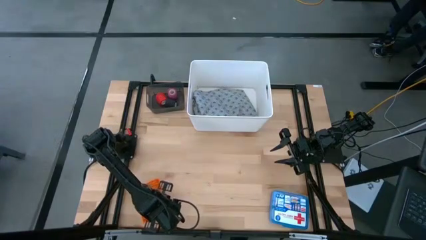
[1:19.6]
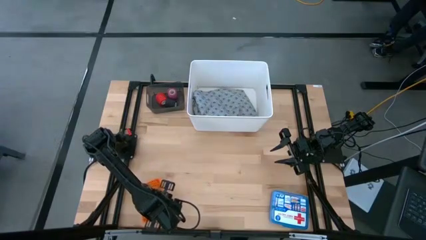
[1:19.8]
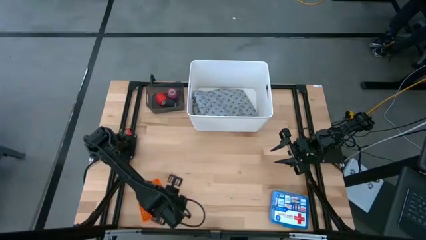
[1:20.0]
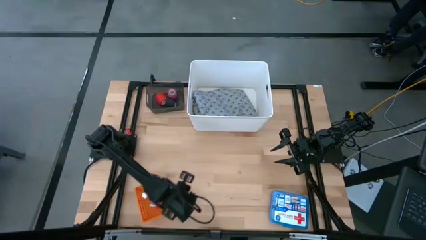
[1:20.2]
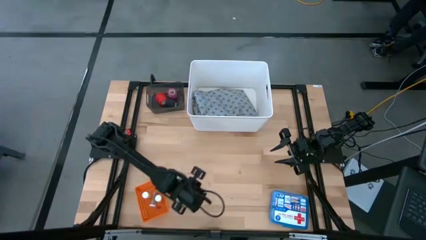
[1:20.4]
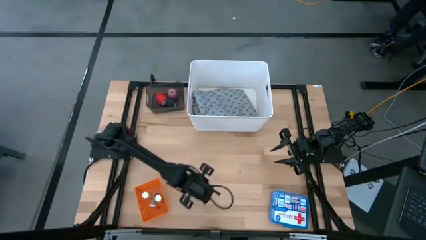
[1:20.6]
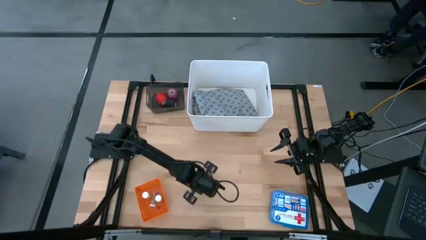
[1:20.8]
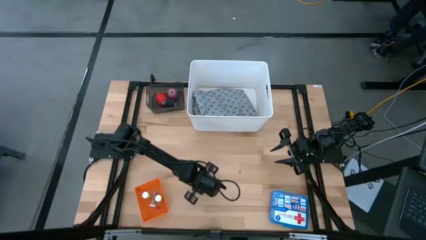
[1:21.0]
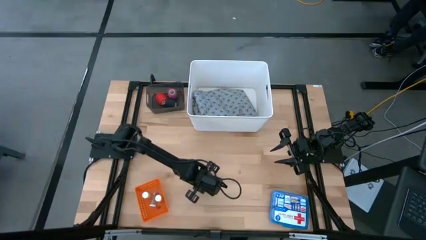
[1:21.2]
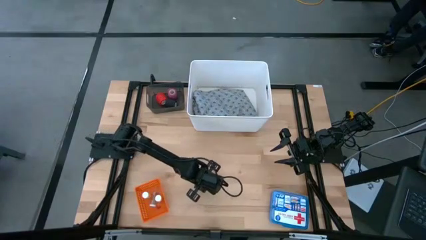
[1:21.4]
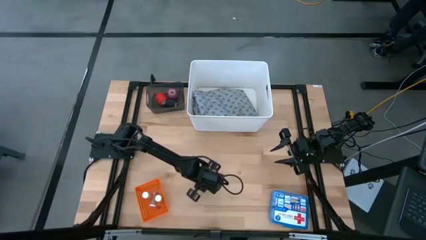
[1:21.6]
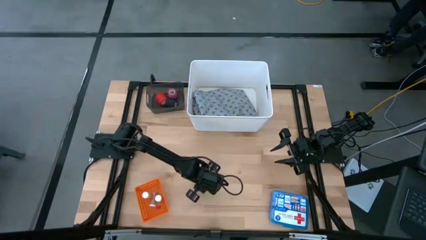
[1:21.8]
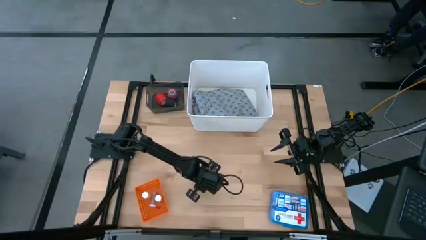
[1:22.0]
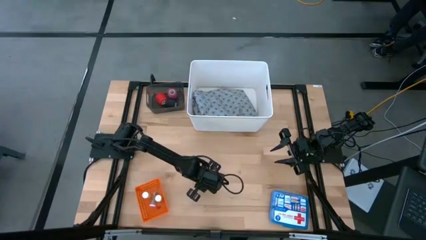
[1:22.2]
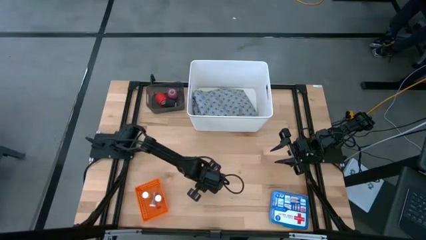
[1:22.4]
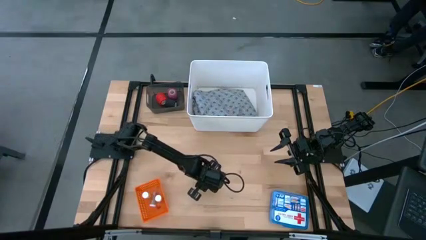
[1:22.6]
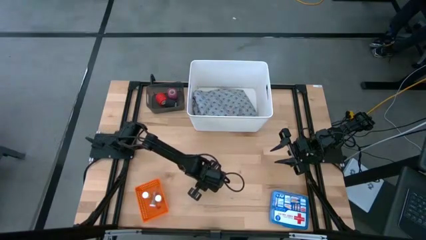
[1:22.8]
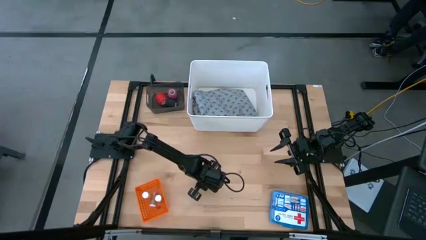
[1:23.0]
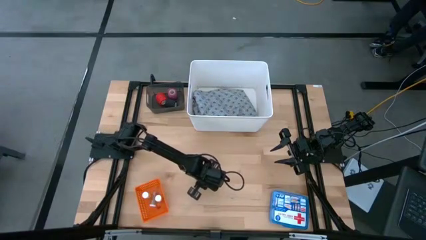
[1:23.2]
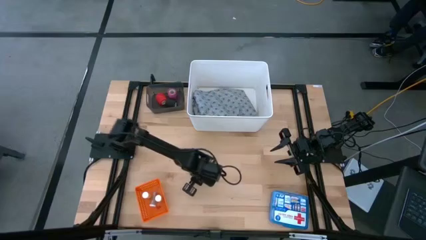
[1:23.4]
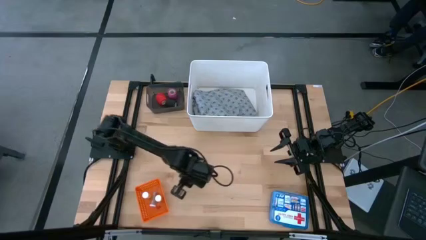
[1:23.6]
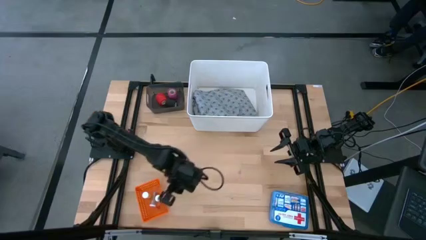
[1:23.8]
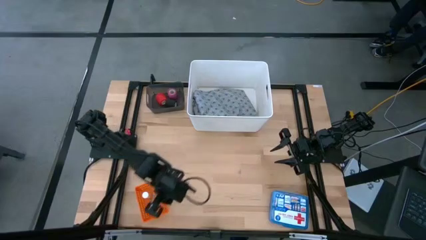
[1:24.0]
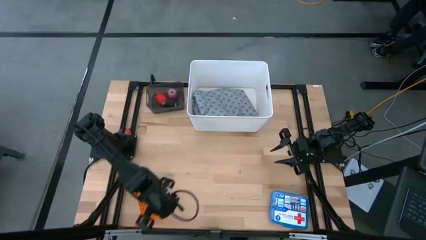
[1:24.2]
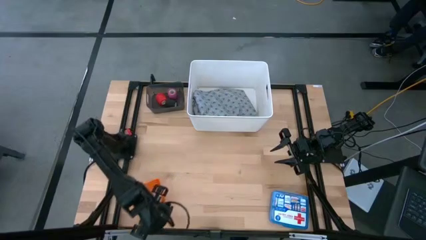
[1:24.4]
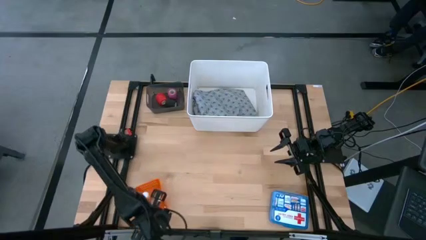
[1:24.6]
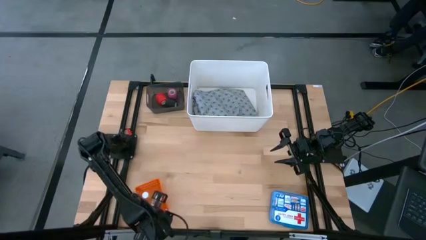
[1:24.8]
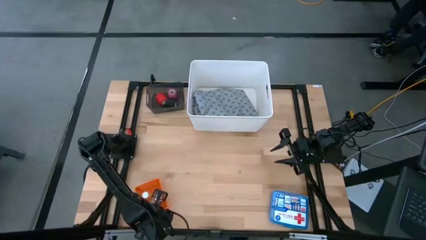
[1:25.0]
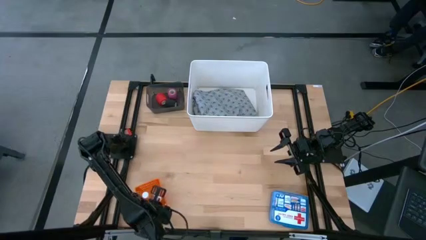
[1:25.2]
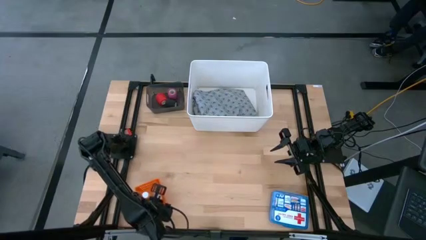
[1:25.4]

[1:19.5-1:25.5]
Task: Pick & Place Medicine items
Put the pink capsule into the orange bin

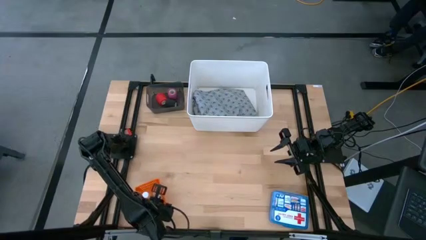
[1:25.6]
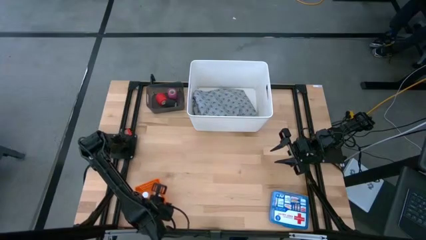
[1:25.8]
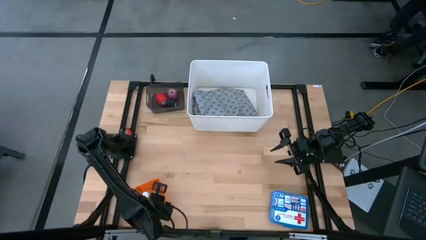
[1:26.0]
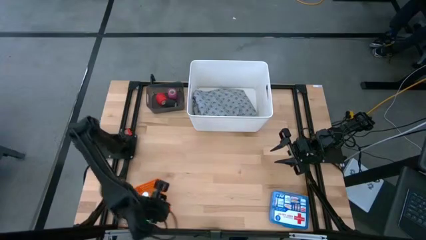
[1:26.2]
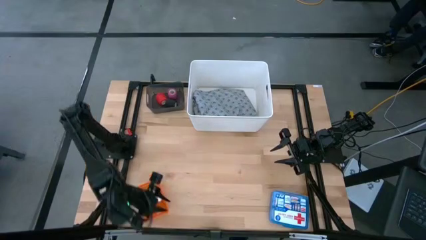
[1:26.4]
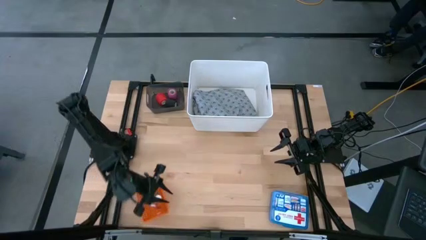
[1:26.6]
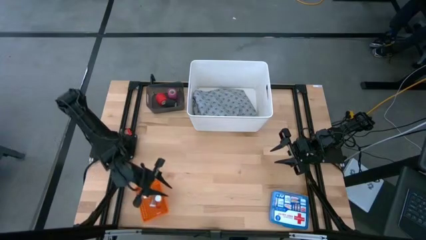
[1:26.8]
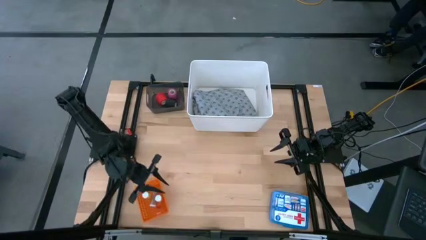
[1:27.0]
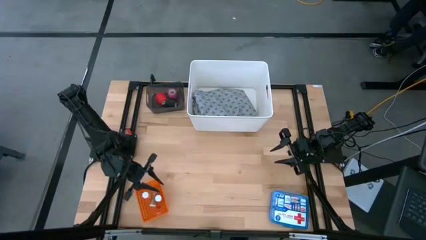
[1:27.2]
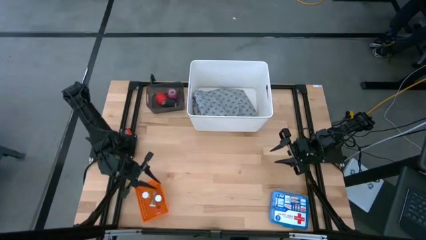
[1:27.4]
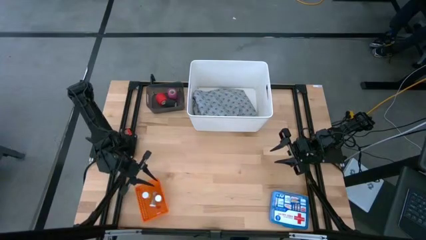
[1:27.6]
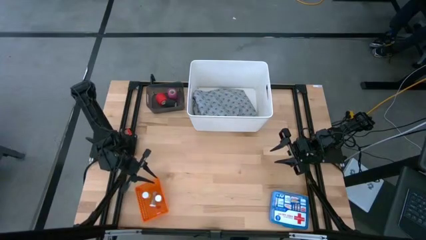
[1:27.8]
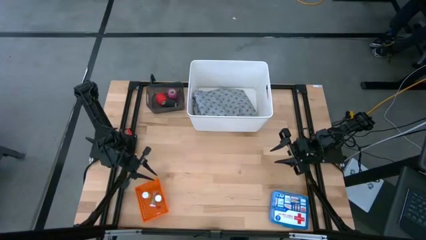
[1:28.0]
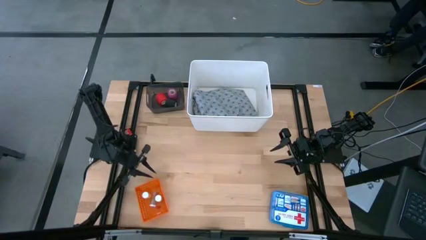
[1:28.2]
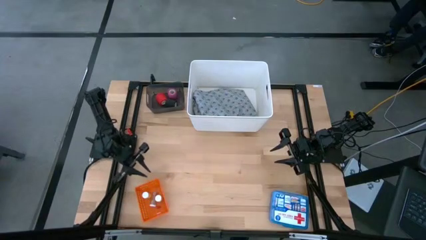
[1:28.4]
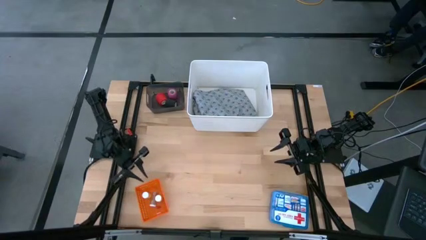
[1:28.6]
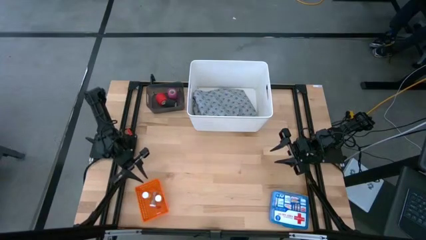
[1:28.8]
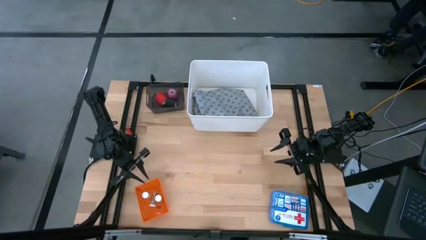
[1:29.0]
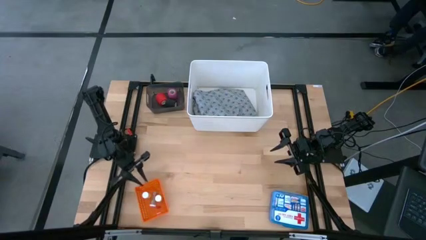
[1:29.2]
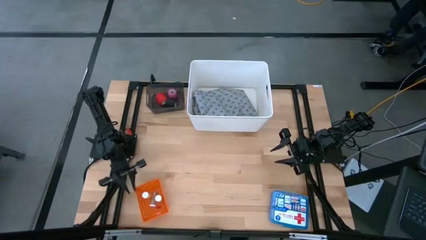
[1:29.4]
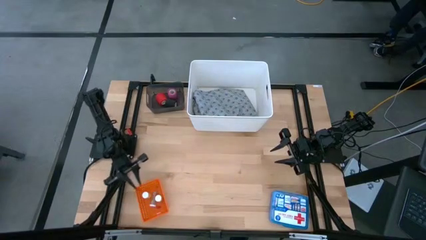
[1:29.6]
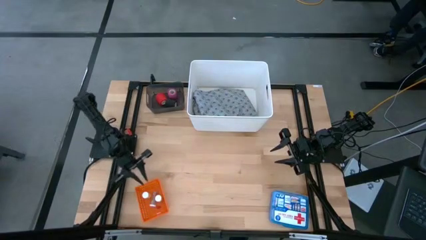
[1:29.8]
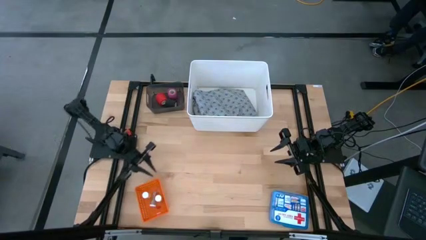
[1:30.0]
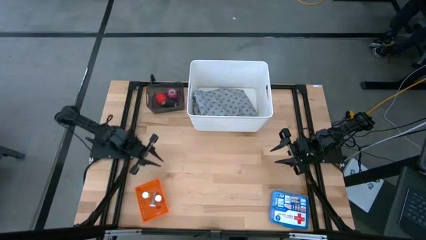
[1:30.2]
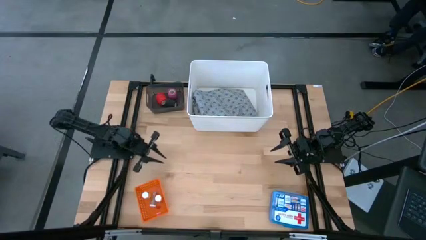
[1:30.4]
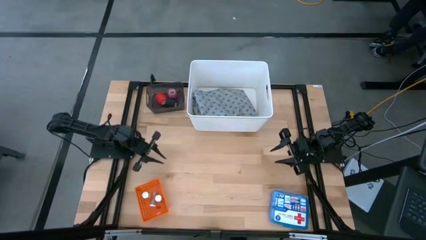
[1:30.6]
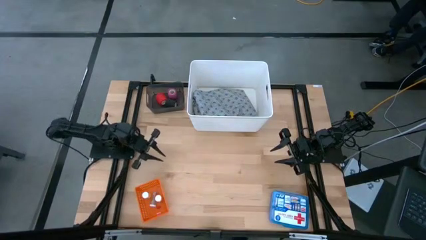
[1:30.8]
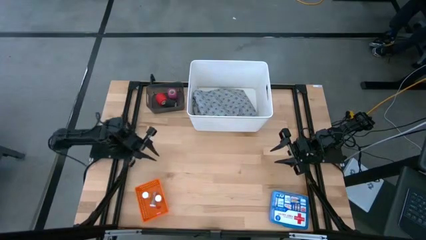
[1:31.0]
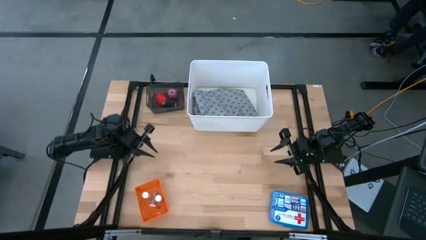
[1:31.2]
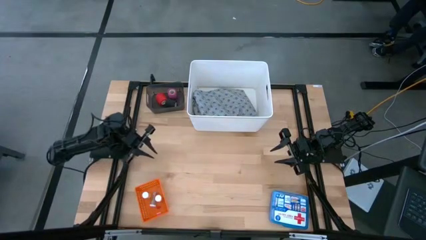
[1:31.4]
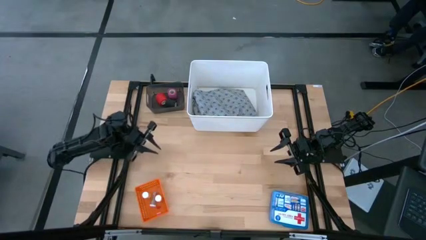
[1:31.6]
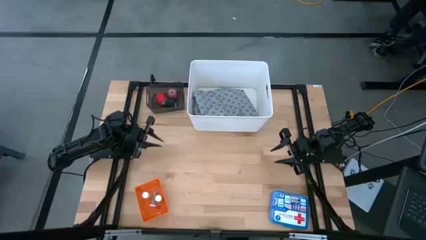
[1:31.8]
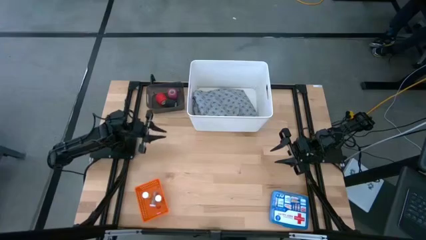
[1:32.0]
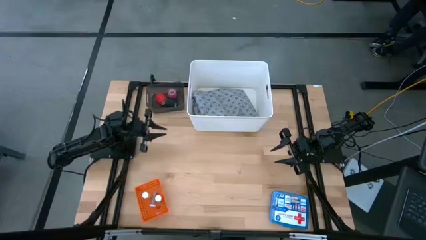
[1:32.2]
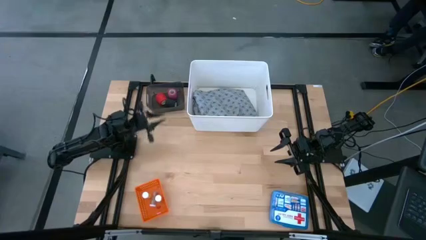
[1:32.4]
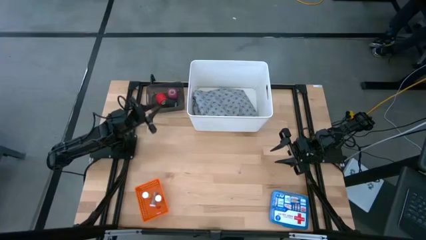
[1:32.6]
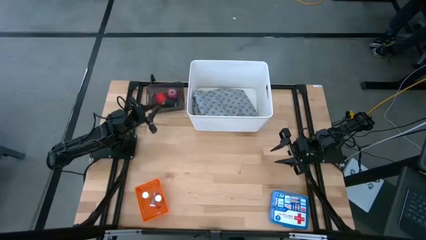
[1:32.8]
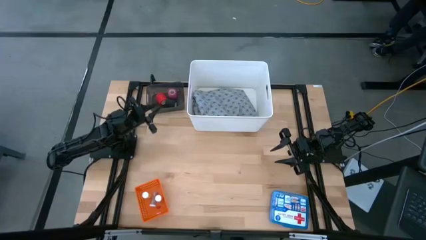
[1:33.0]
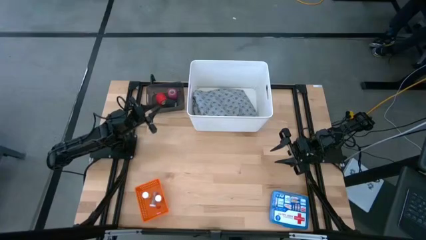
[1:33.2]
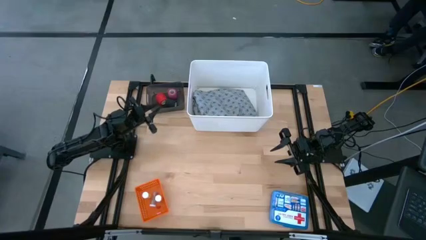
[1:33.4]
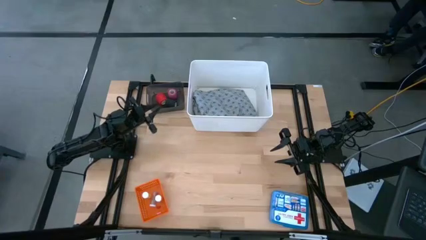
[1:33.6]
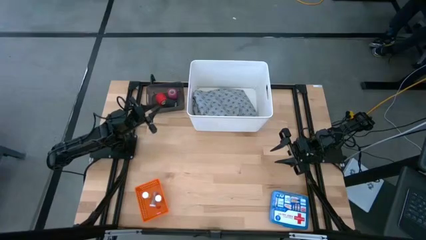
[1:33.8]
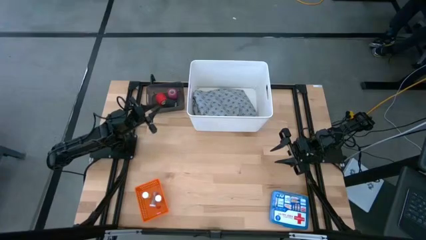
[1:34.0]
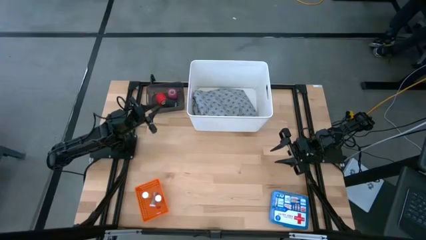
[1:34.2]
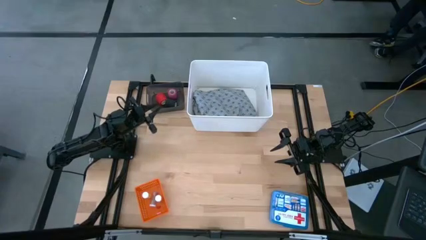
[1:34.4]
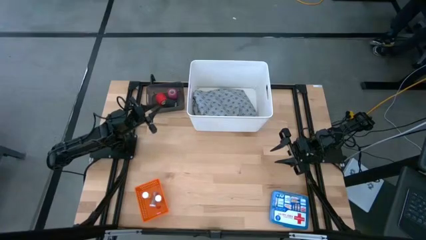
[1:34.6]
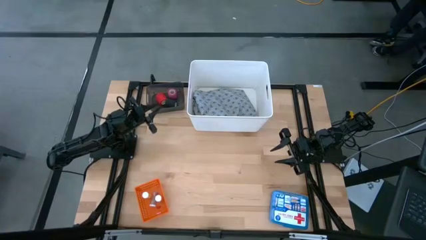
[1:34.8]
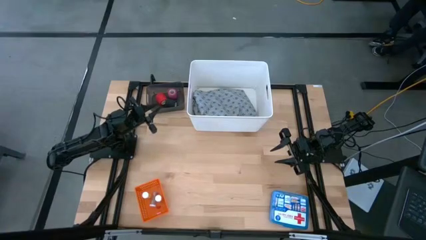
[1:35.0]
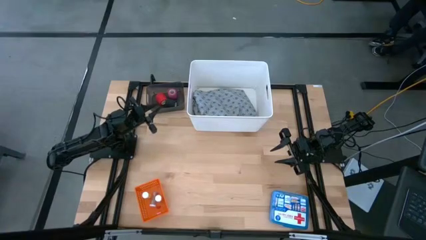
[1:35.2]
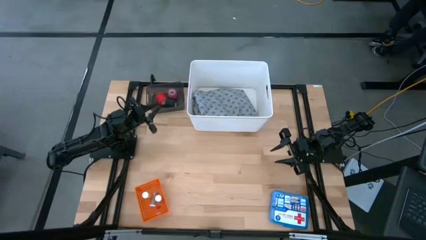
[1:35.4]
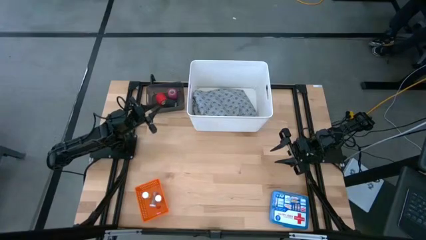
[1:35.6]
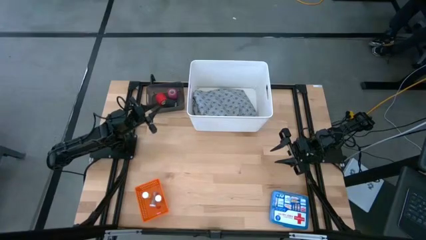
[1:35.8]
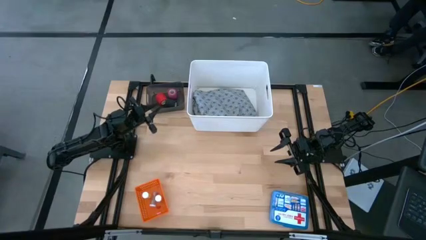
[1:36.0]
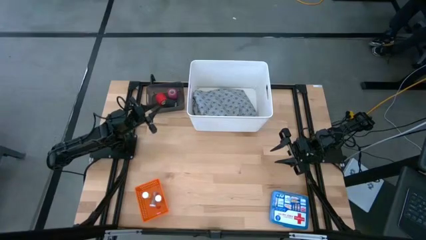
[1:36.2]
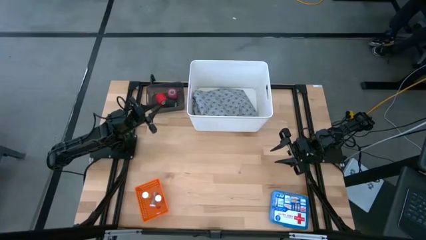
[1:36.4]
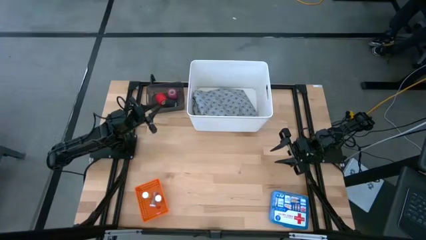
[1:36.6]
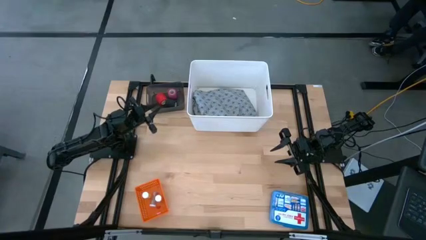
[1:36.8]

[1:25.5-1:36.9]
Return to Home Position
